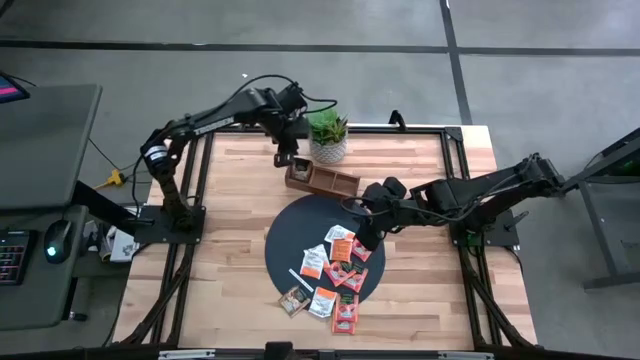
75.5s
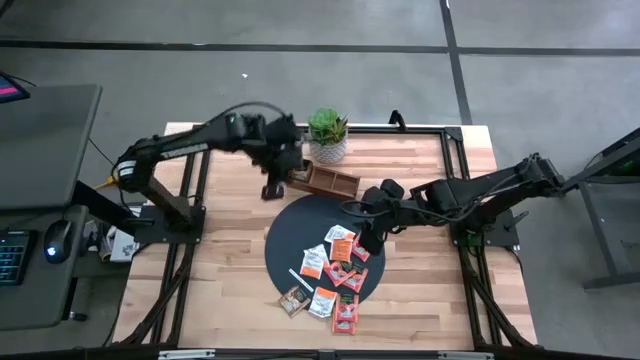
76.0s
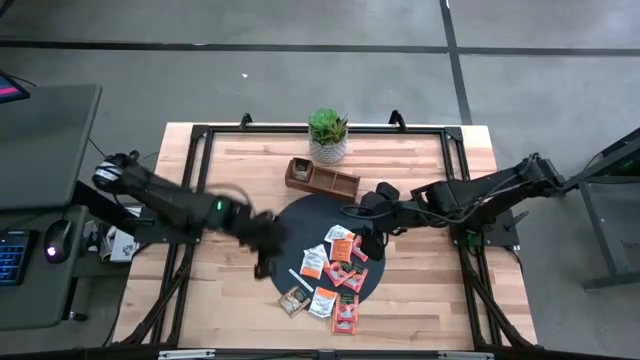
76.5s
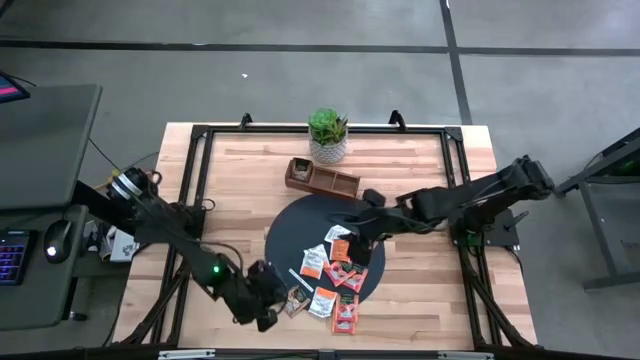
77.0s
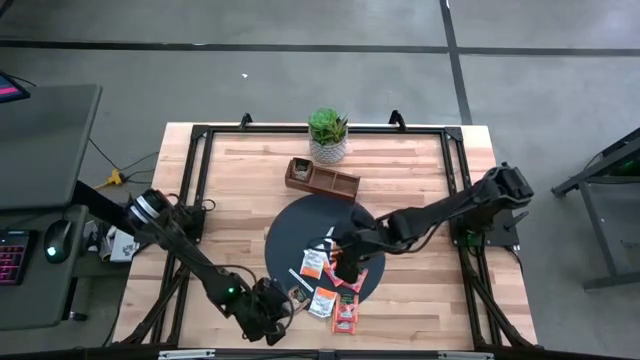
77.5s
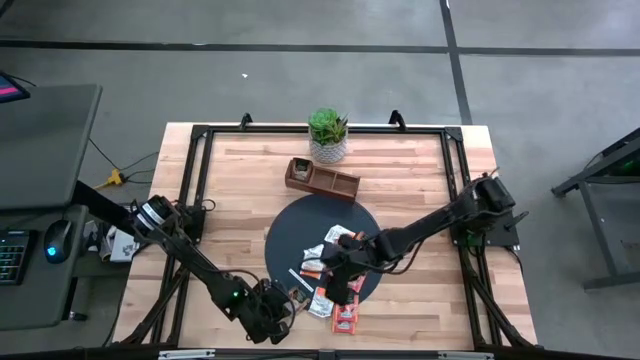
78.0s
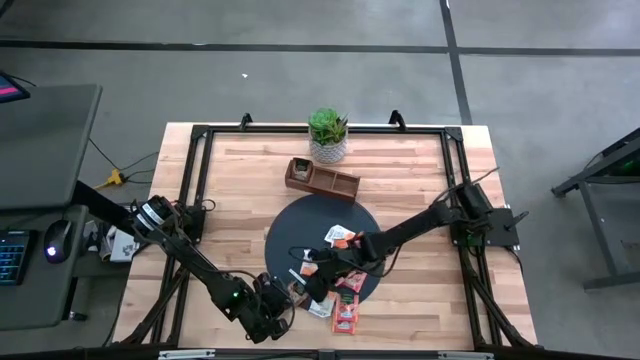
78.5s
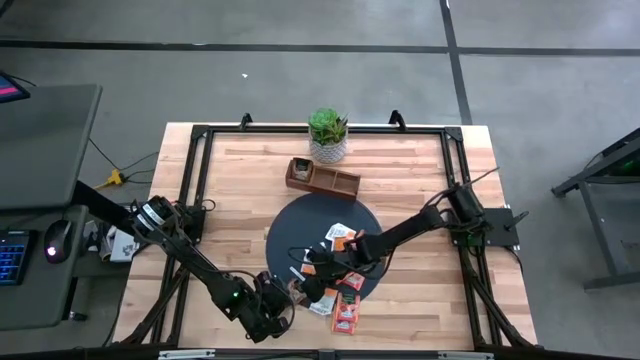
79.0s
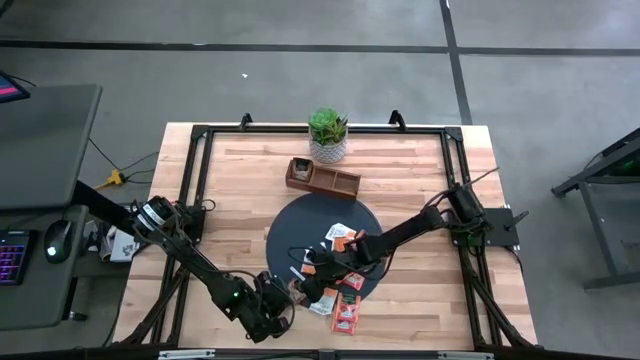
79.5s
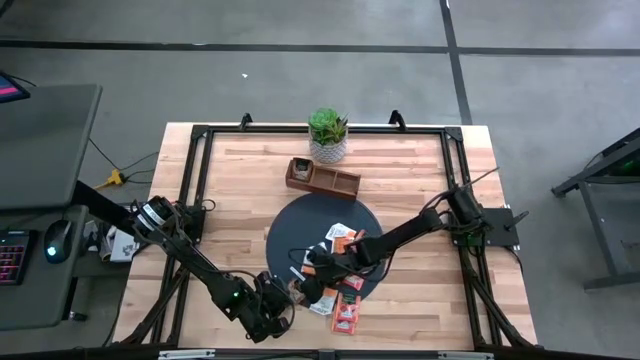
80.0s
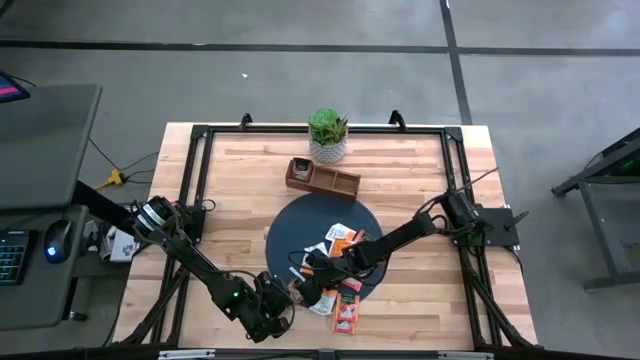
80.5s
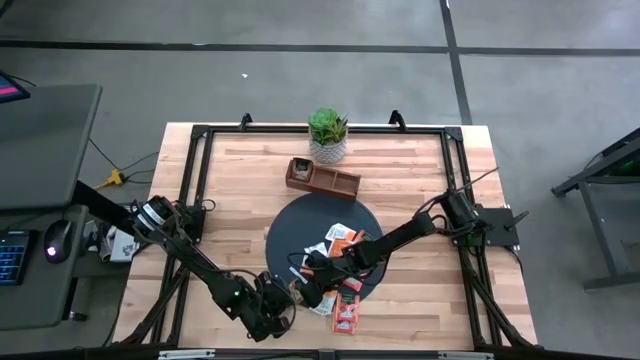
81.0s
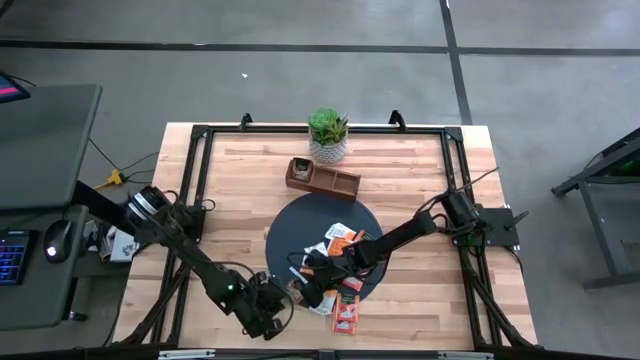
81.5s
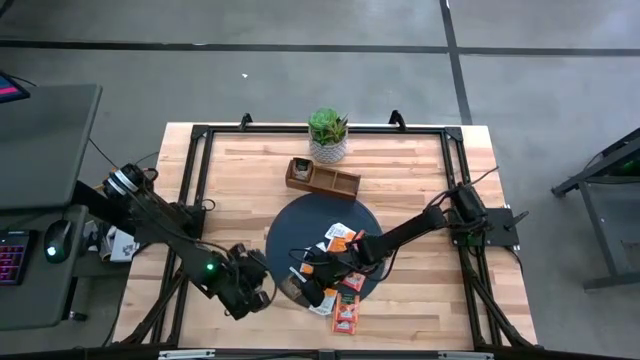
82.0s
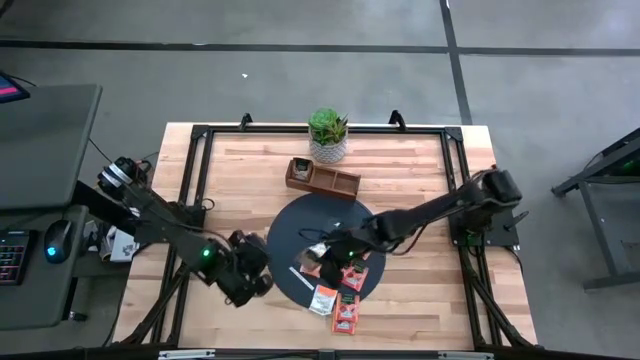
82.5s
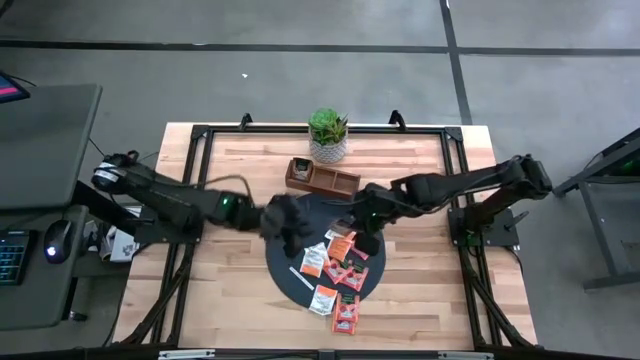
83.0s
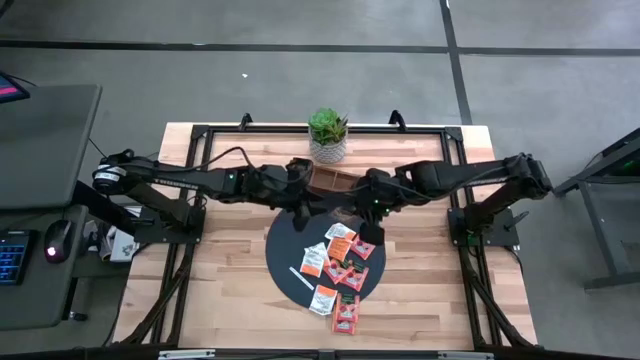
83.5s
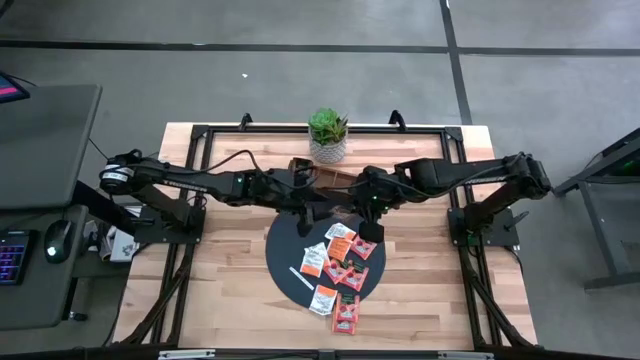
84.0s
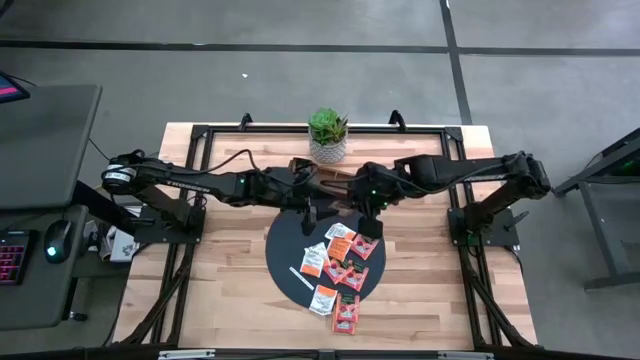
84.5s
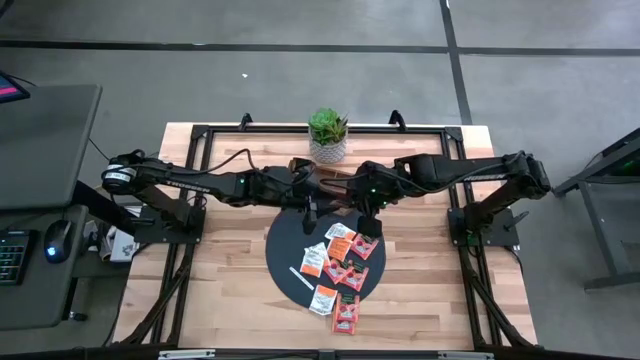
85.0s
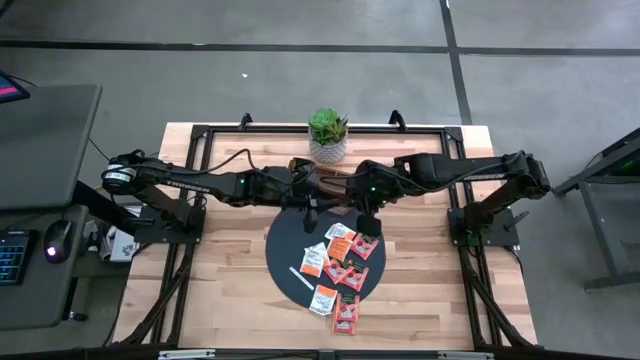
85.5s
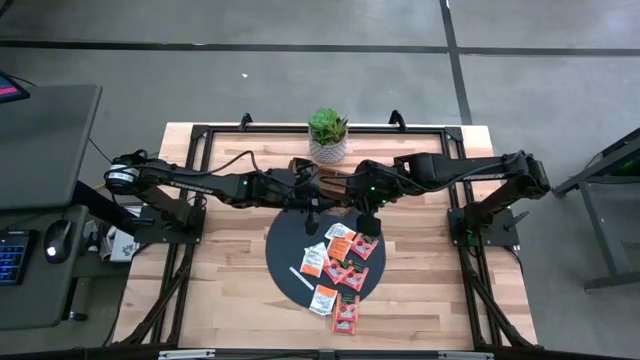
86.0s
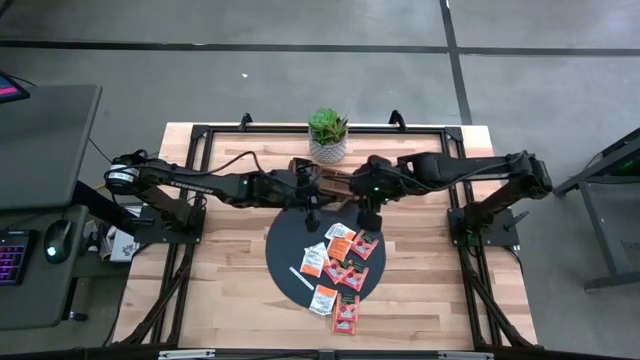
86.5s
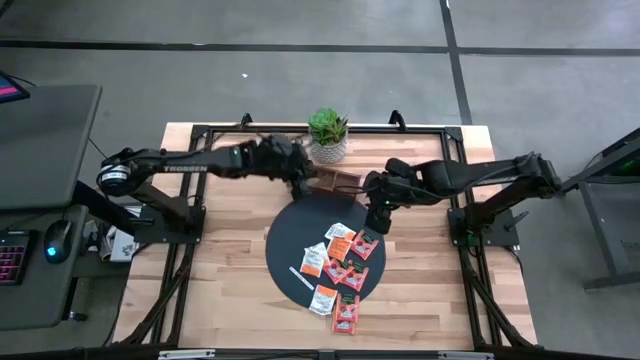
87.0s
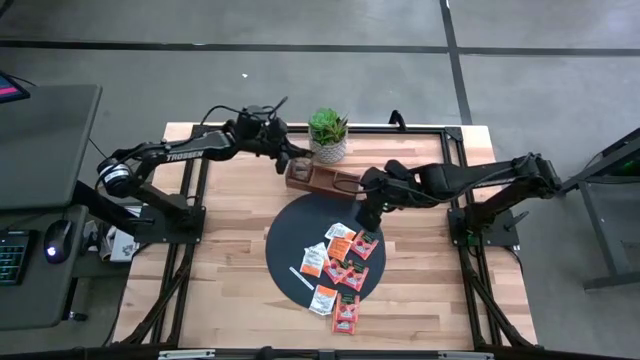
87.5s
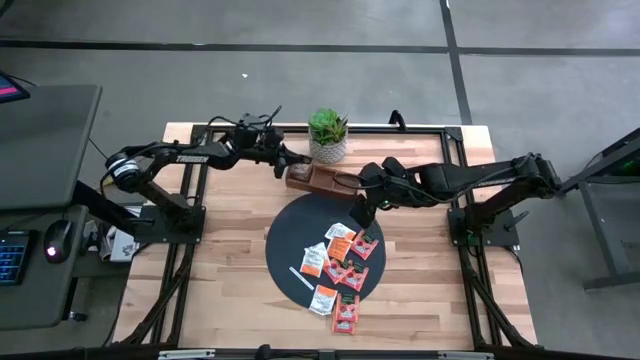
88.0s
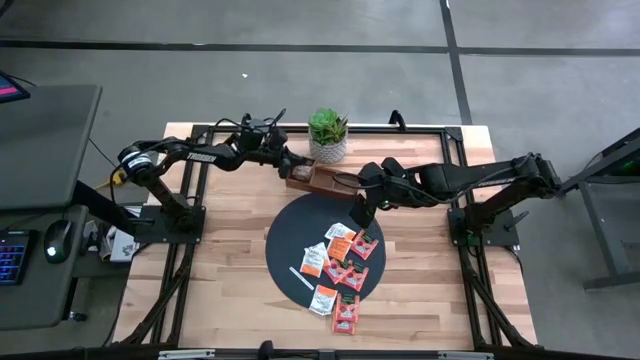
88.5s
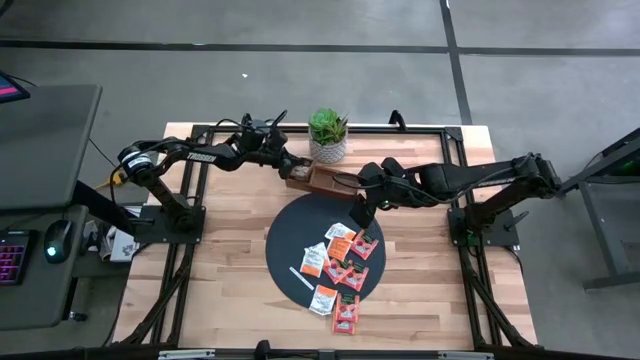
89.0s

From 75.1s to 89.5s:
Task: Pick & Place Tea
Put the brown tea bag into the left section of the wooden organizer

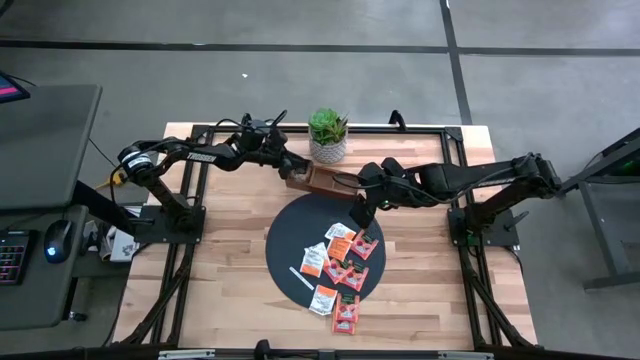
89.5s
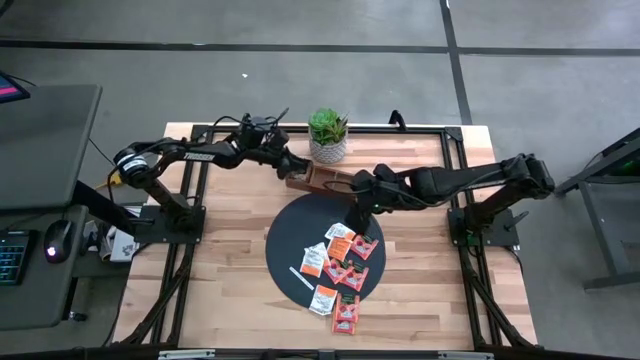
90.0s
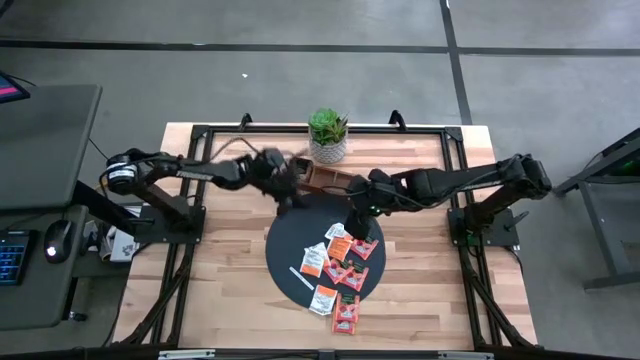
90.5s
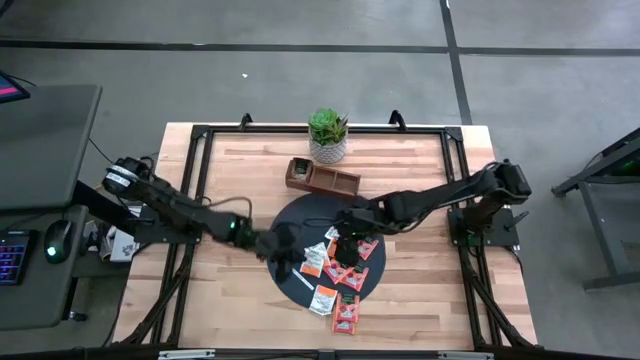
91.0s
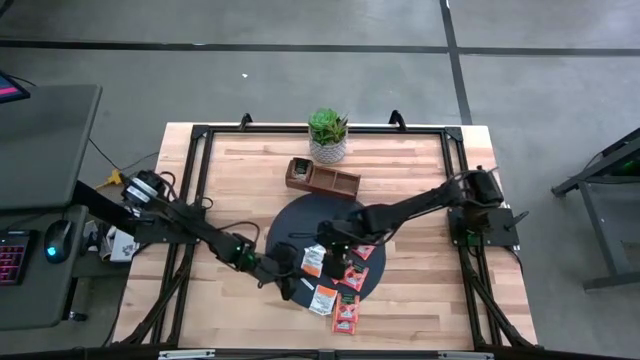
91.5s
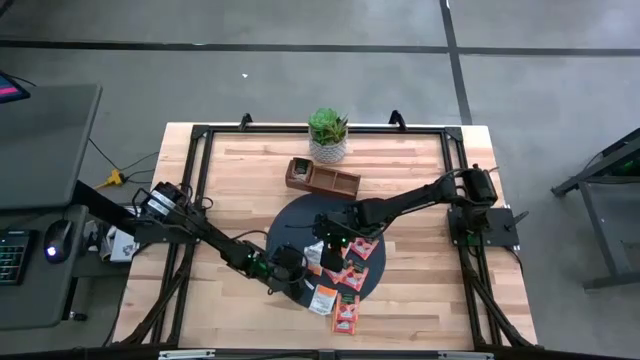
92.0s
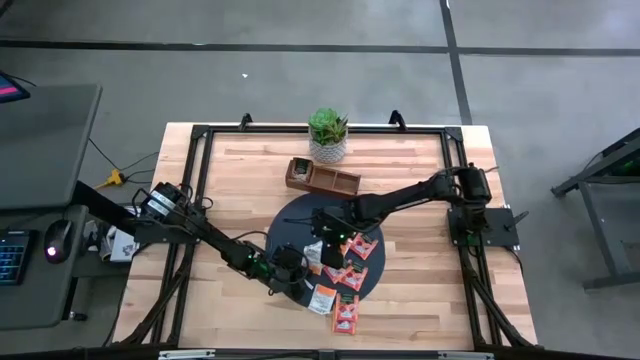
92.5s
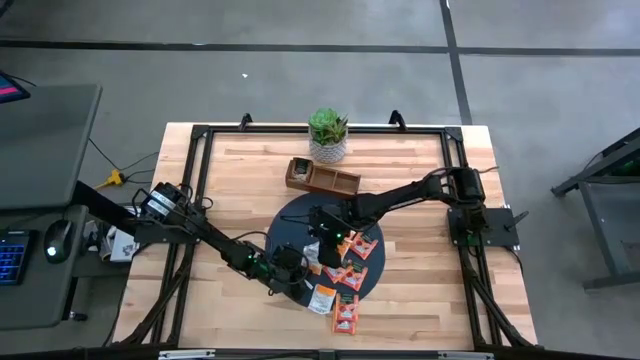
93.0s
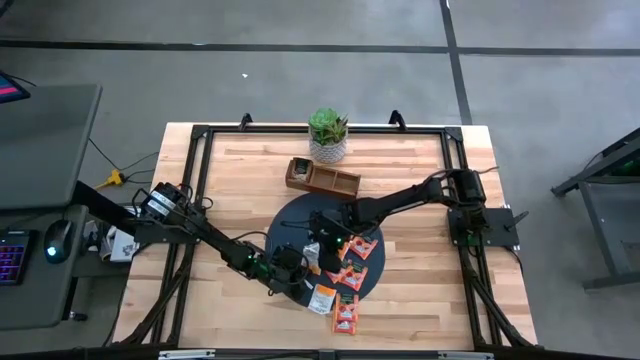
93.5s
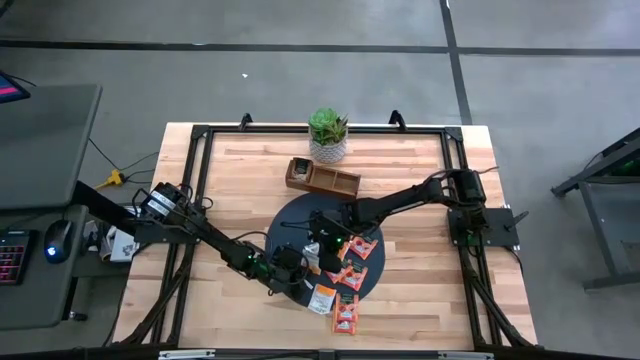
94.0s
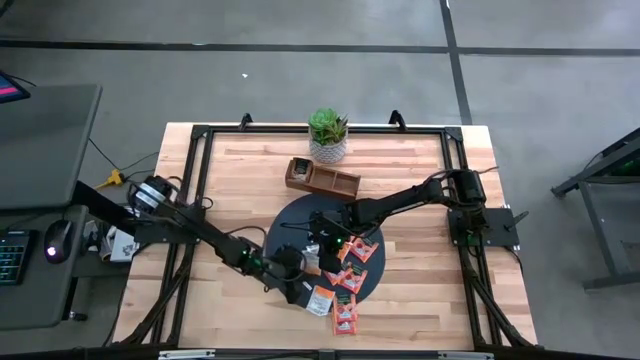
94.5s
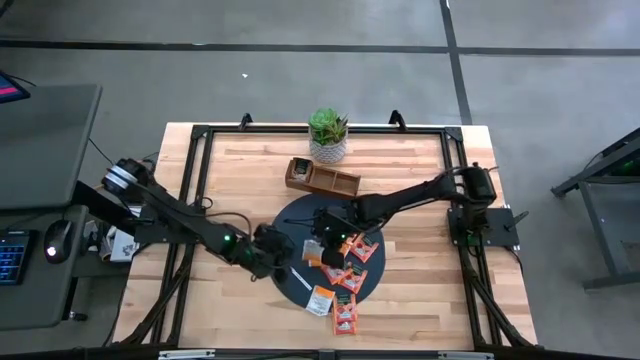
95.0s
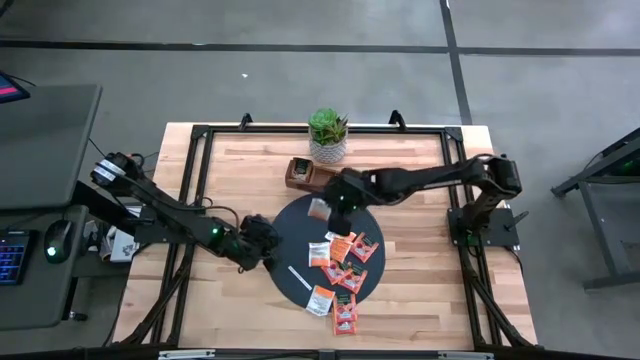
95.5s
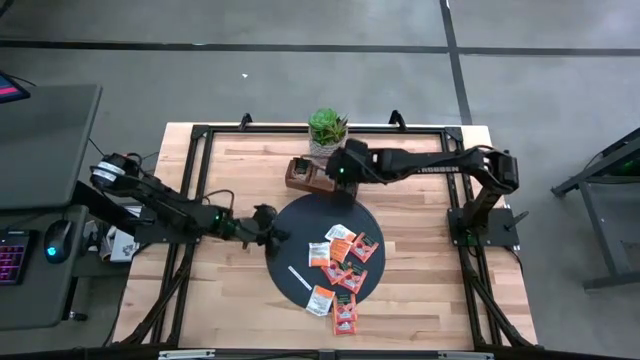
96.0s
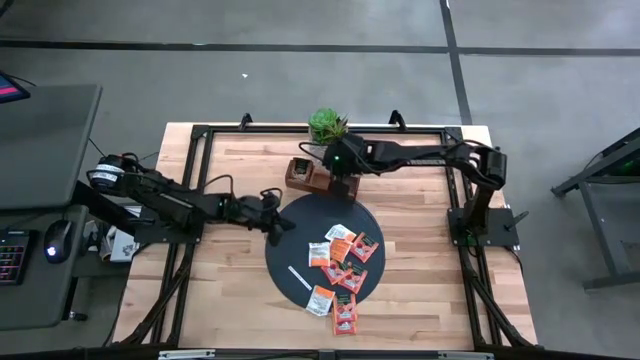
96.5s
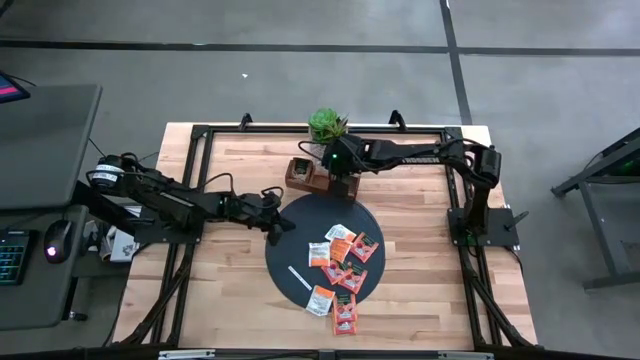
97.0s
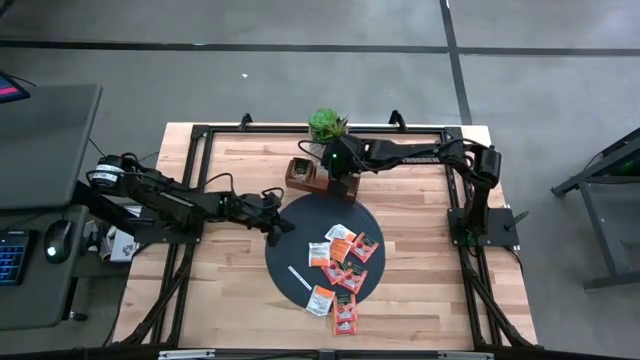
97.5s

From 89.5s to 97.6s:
Put the white tea bag into the middle section of the wooden organizer
